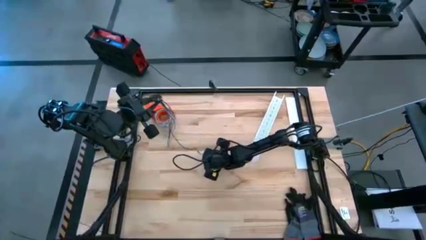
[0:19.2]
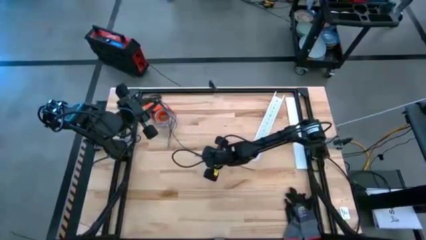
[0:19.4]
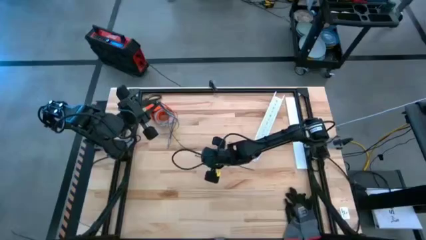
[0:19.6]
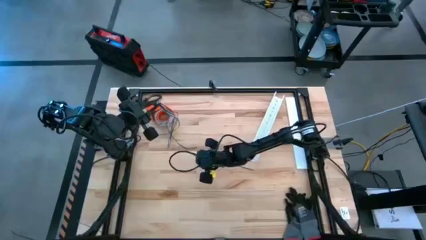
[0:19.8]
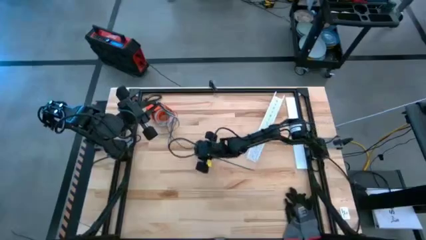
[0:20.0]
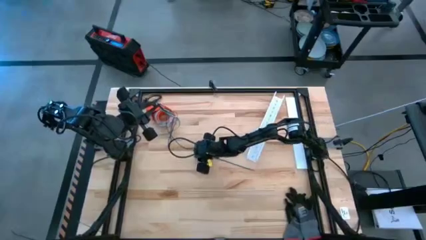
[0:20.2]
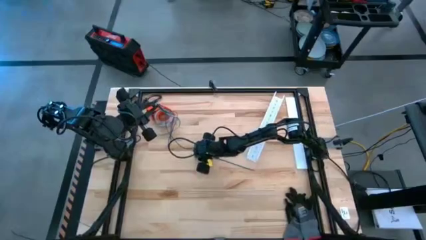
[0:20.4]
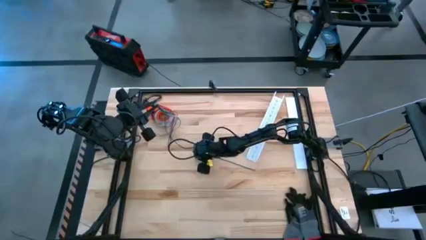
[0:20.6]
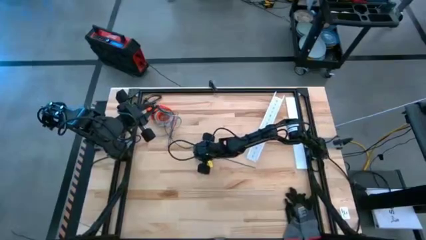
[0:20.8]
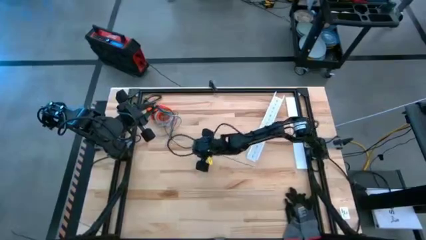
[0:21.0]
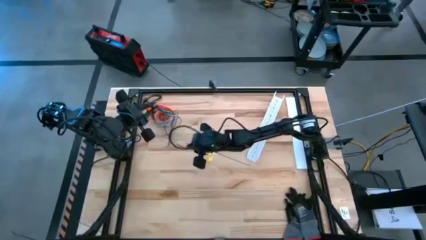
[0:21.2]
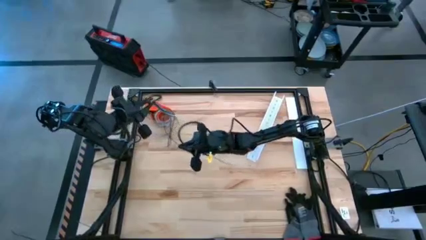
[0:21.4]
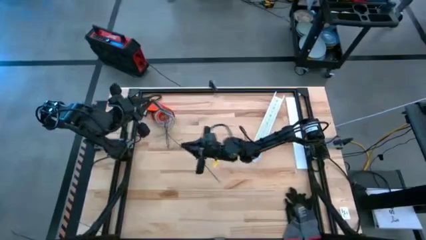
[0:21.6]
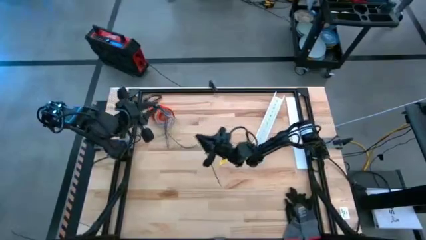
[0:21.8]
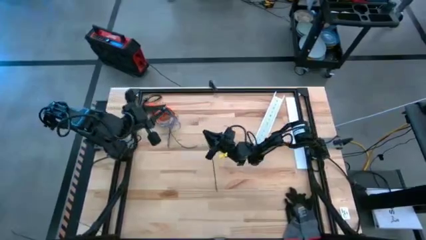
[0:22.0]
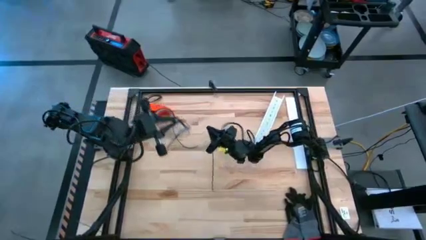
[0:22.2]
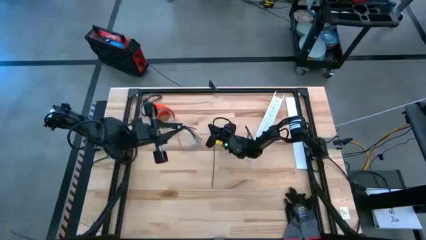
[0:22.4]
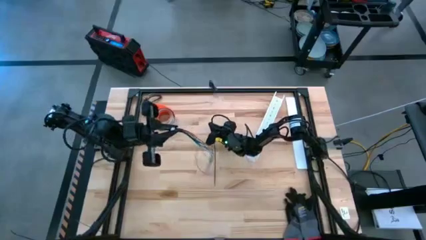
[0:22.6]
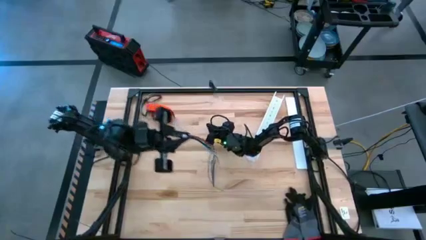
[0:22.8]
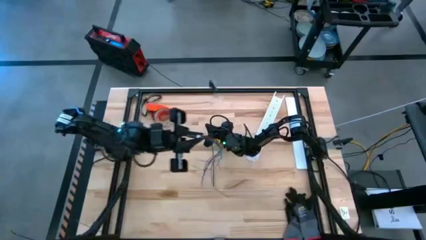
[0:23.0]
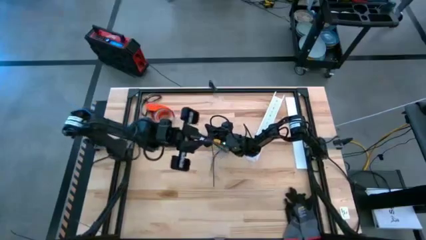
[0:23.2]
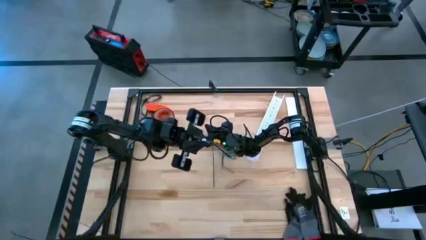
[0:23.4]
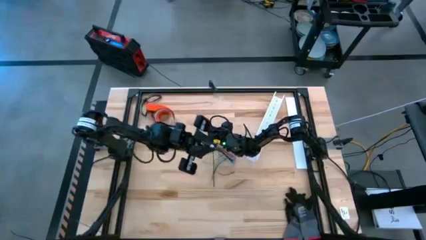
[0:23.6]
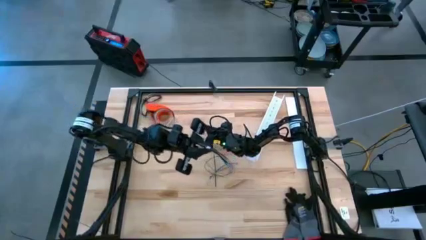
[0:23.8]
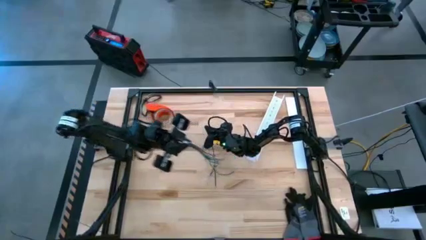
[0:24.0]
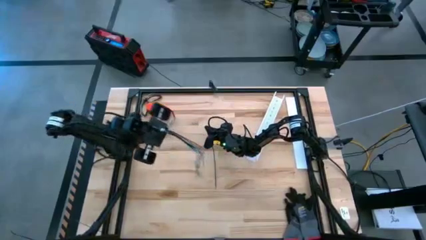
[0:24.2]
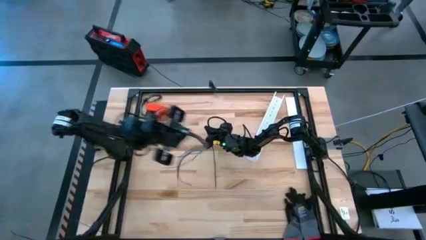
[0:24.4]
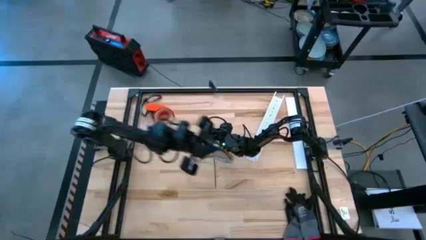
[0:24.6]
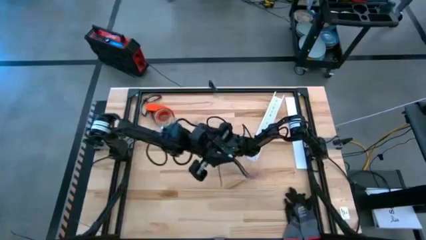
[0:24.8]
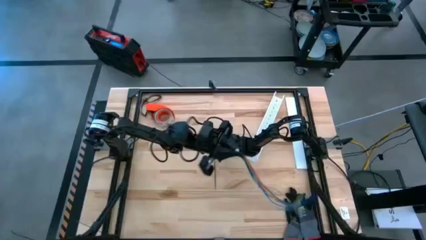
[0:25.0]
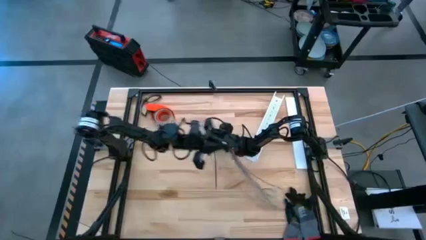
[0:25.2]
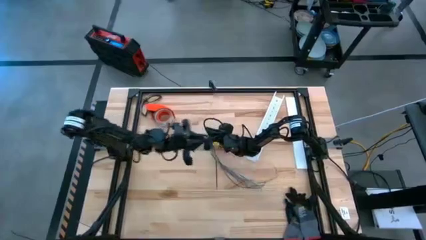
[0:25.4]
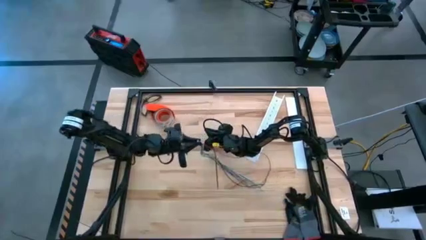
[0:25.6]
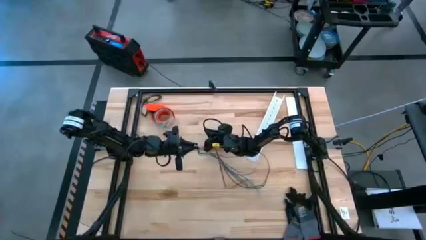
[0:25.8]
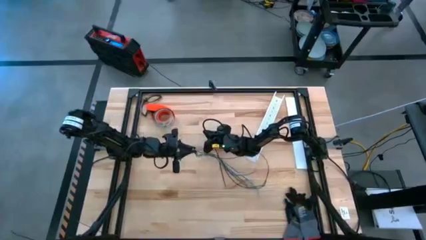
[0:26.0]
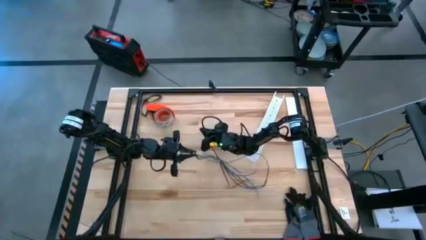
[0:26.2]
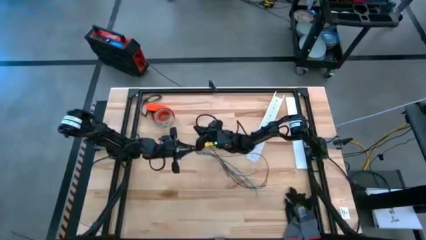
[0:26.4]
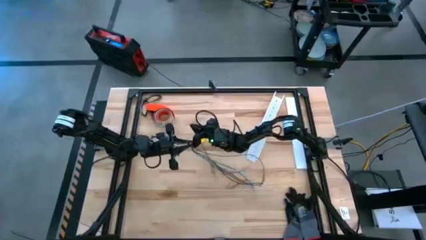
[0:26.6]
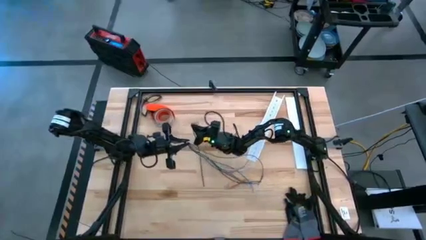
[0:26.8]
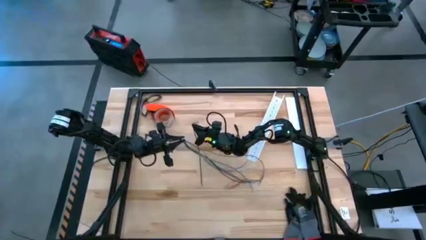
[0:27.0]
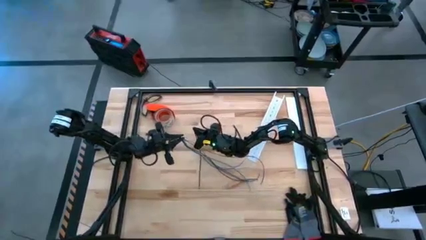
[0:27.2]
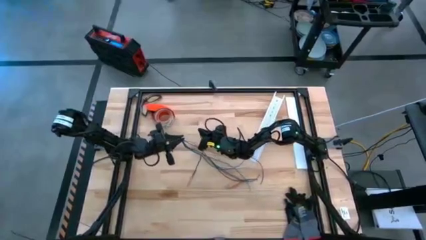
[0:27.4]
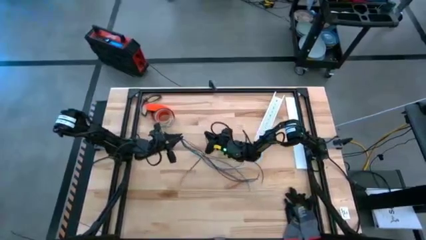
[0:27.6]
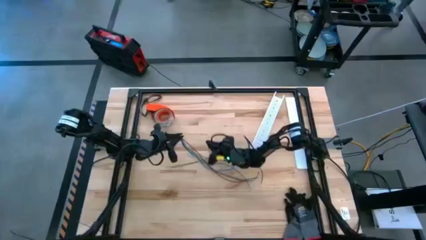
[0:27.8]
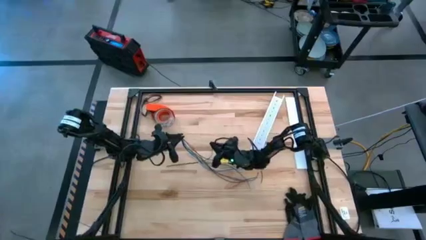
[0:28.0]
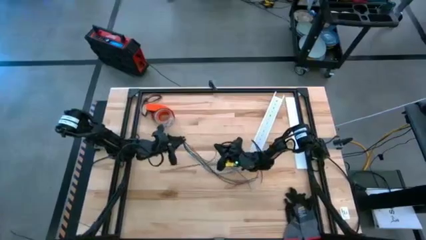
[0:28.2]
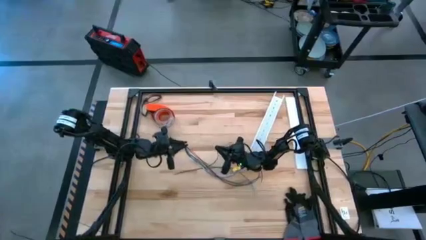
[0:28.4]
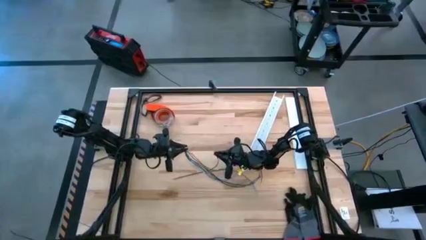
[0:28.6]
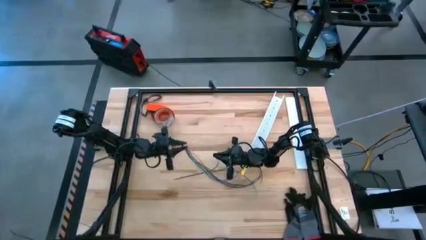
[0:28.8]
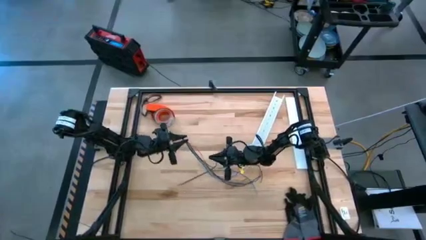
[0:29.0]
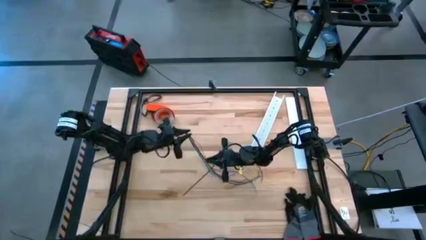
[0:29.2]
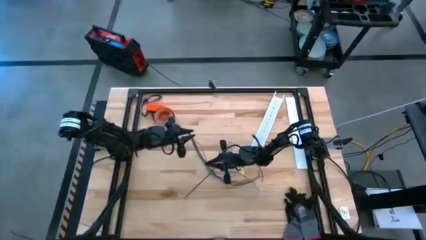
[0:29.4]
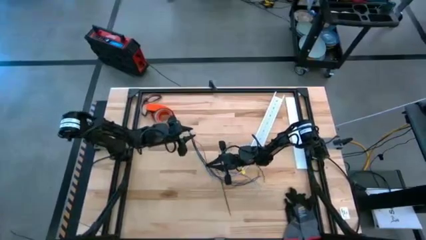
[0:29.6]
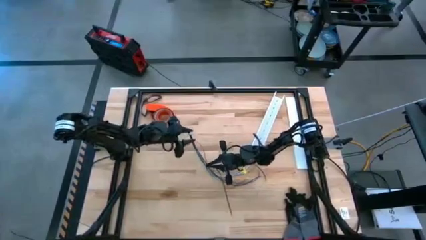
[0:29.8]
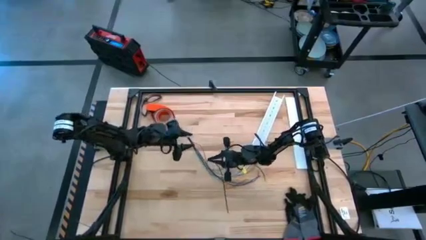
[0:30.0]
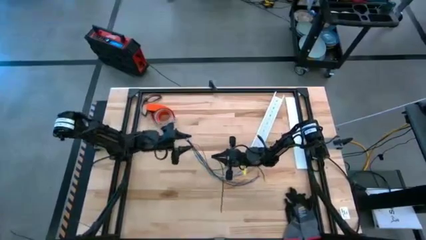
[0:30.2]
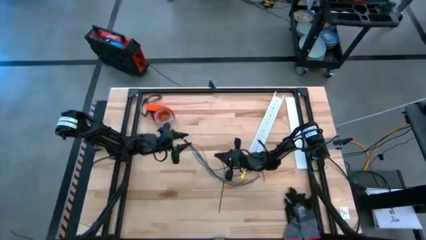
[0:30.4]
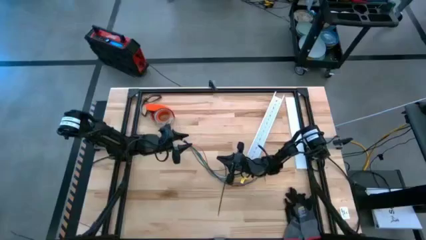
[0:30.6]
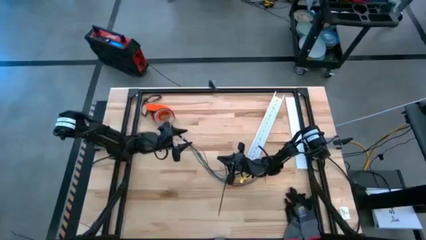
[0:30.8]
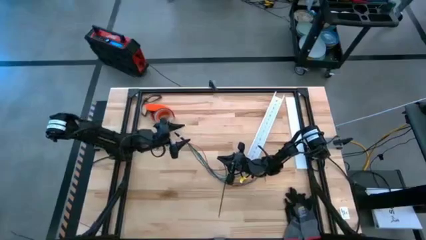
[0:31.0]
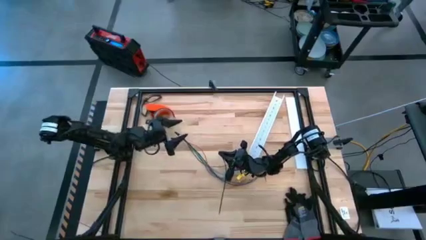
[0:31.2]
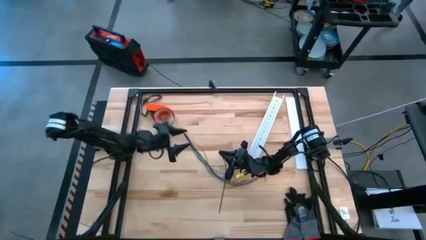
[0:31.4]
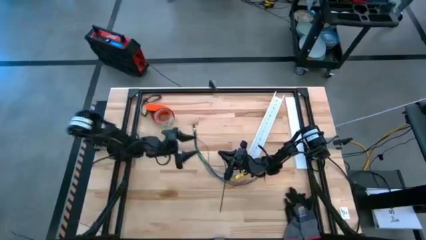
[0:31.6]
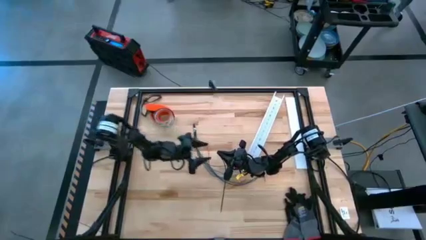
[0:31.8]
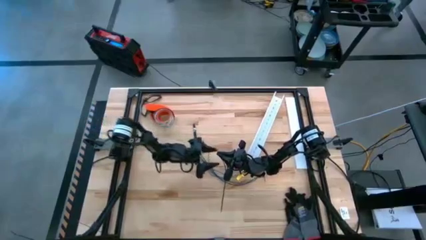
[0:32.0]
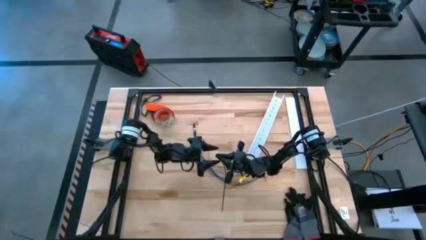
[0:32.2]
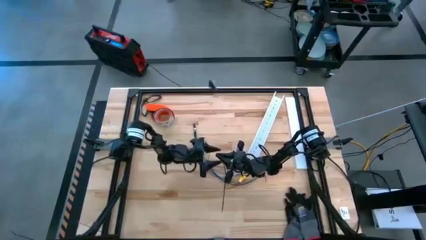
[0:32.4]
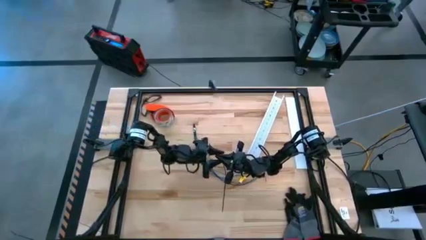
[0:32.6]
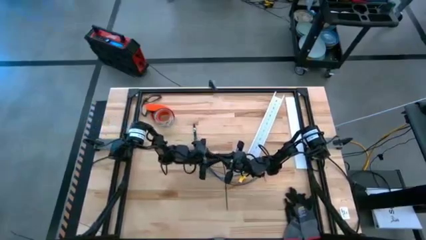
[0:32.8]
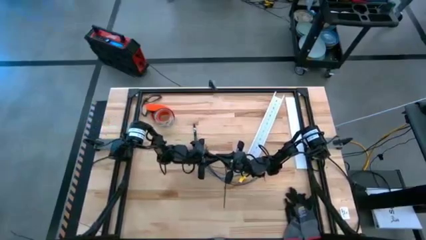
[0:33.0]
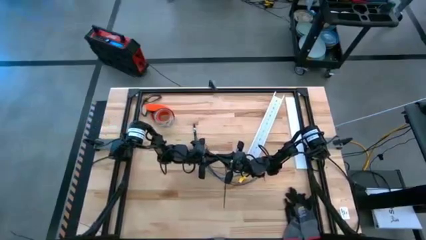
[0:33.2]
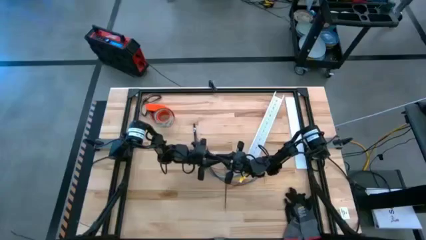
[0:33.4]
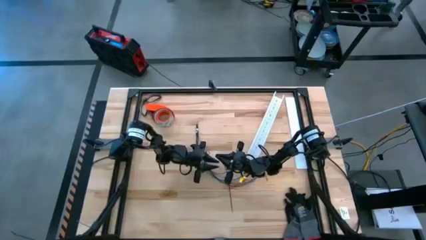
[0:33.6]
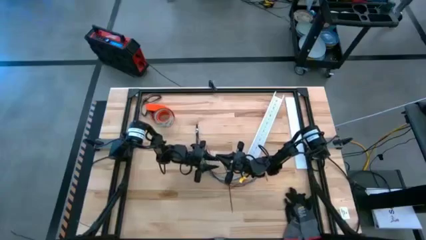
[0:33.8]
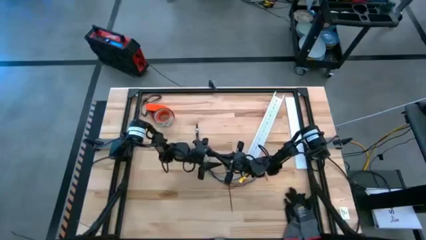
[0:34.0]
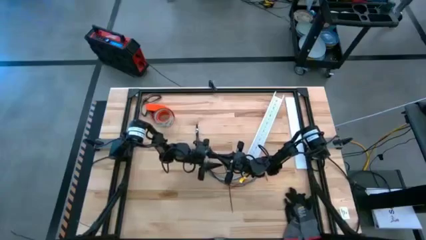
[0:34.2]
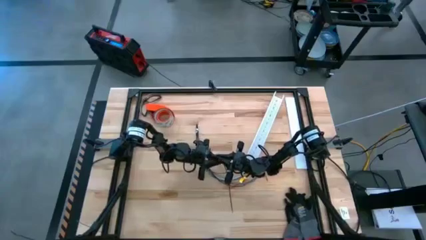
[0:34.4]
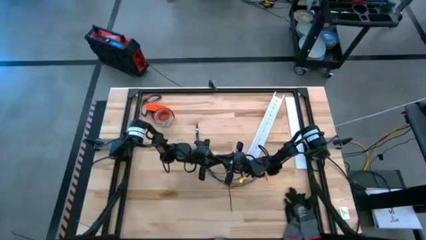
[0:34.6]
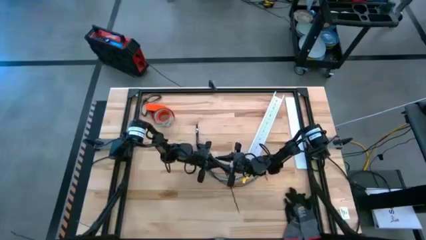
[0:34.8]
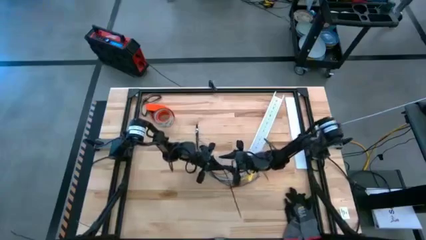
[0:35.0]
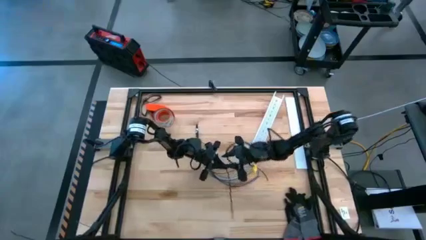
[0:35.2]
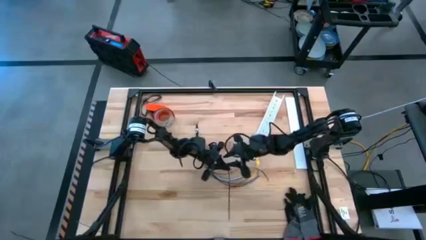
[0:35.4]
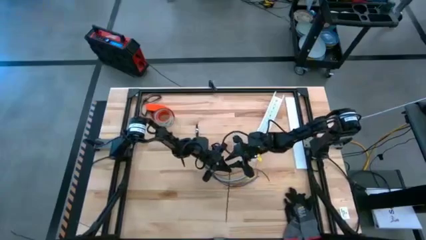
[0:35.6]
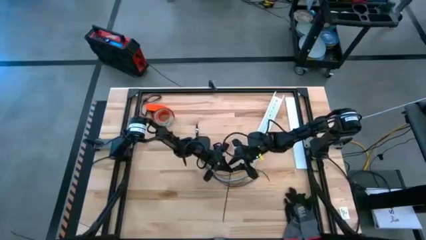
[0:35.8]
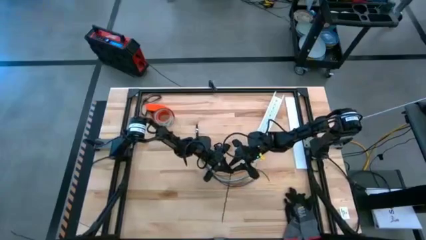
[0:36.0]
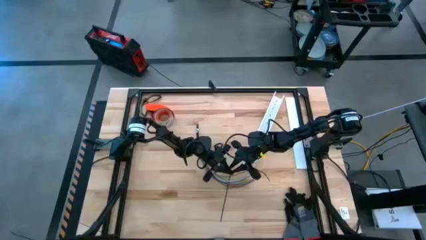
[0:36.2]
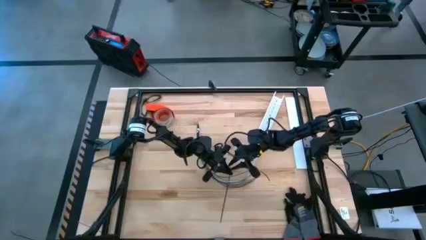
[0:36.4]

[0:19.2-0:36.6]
Task: Ziptie cables
Wrap the cables together using a black zip tie
